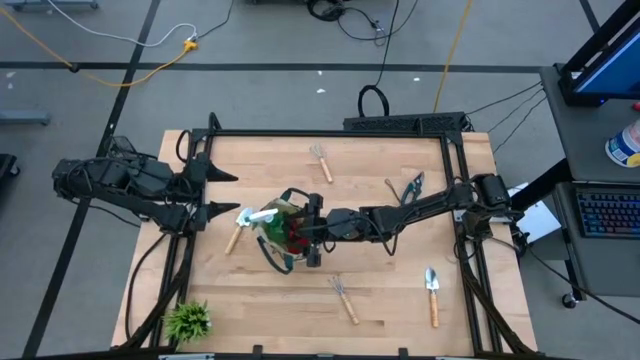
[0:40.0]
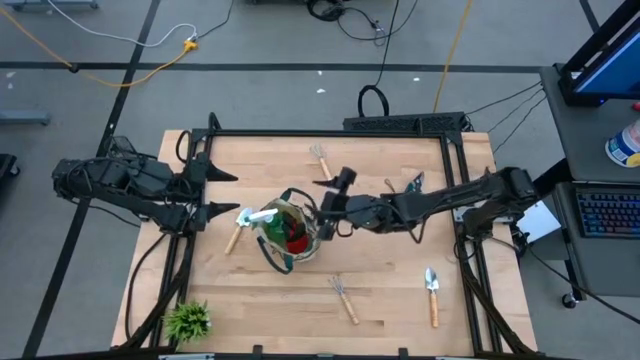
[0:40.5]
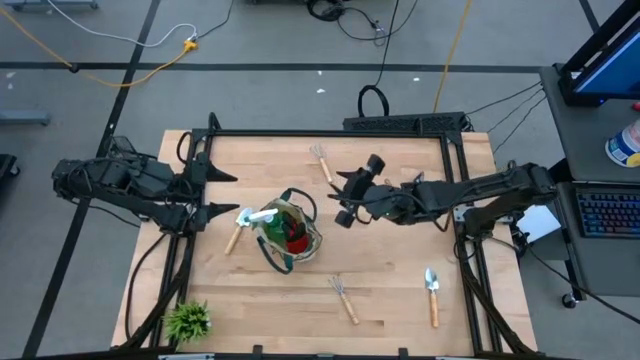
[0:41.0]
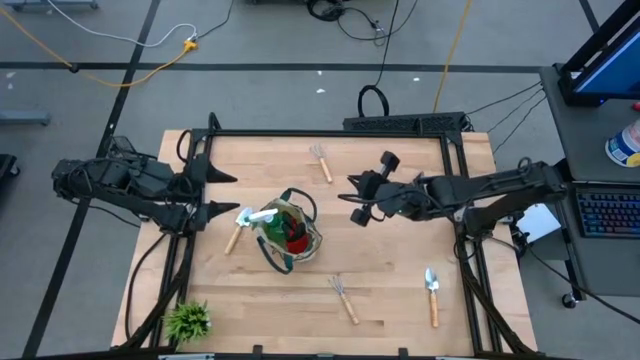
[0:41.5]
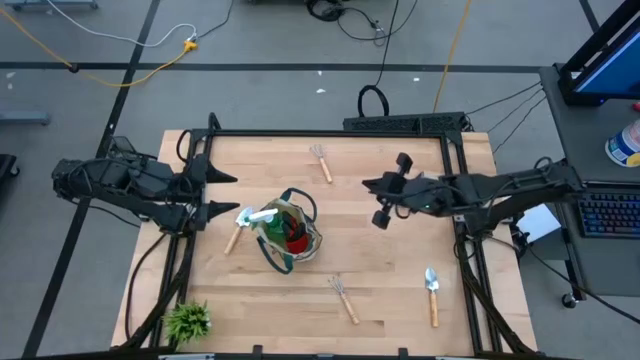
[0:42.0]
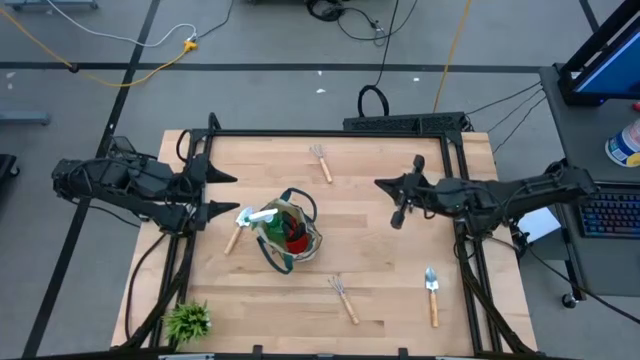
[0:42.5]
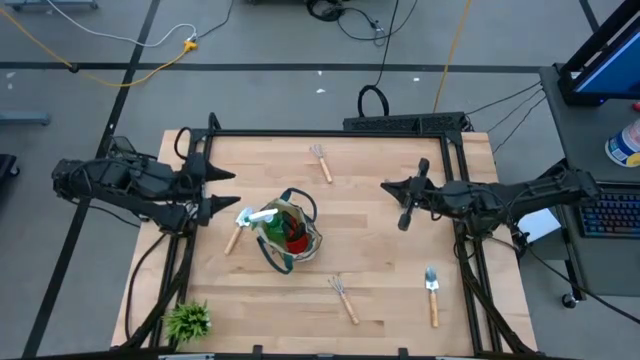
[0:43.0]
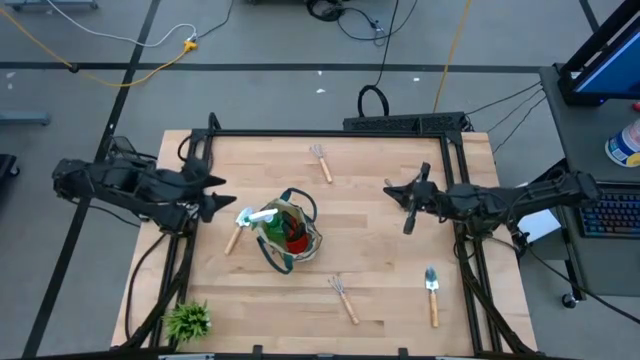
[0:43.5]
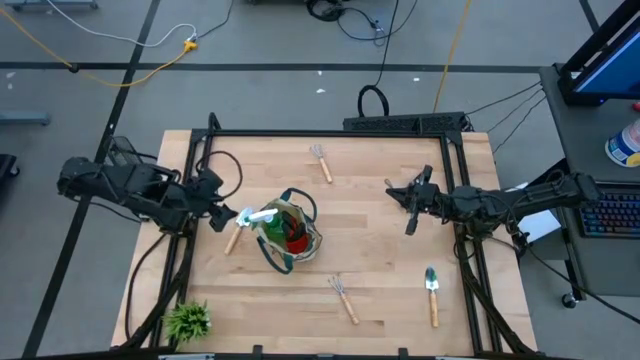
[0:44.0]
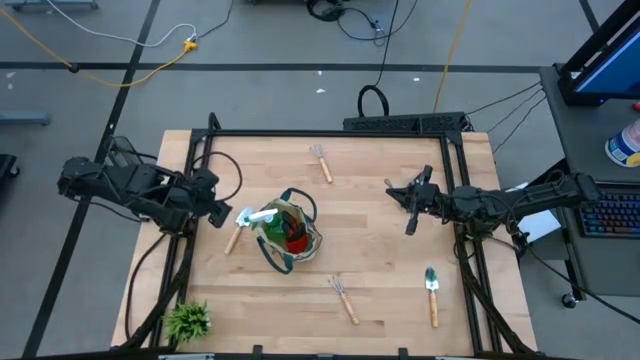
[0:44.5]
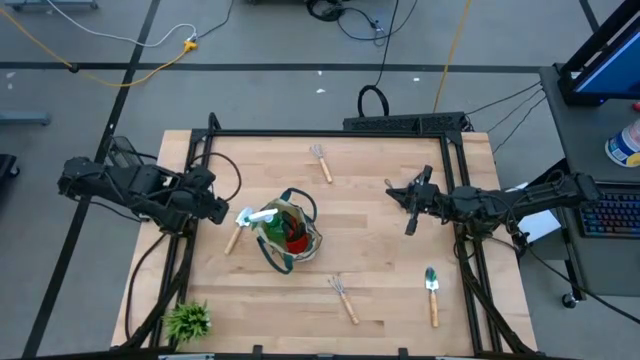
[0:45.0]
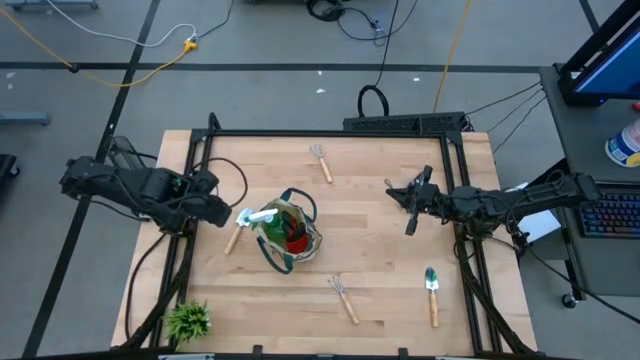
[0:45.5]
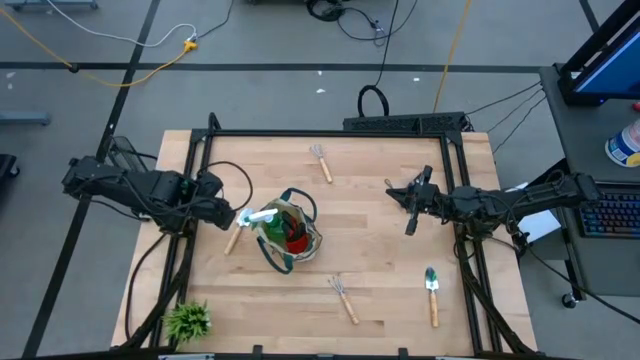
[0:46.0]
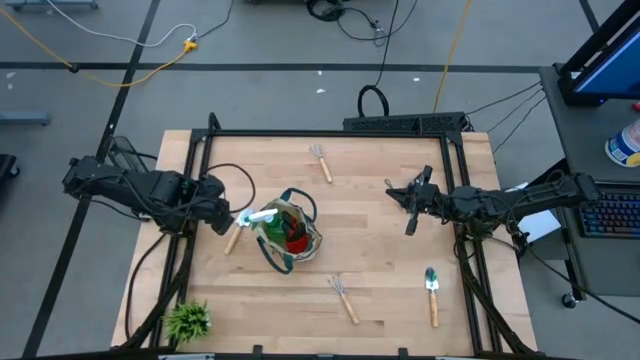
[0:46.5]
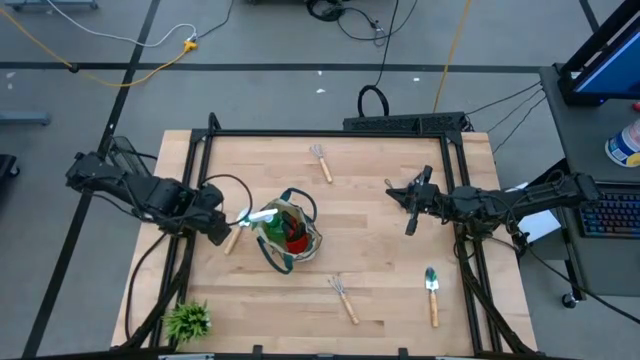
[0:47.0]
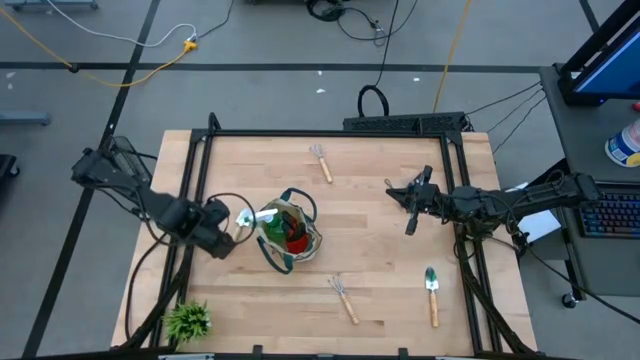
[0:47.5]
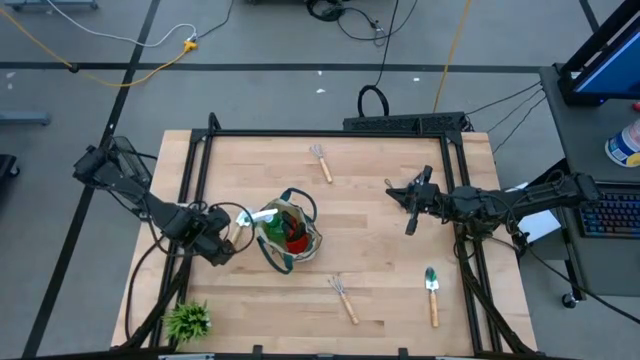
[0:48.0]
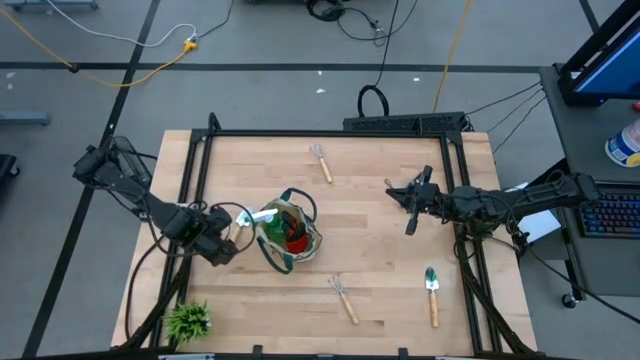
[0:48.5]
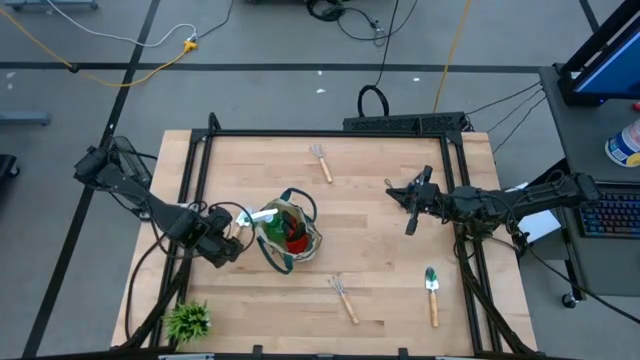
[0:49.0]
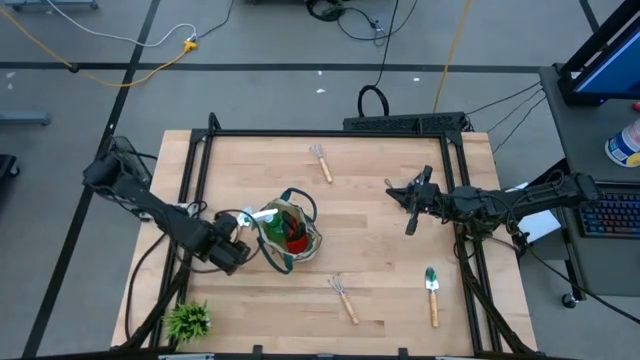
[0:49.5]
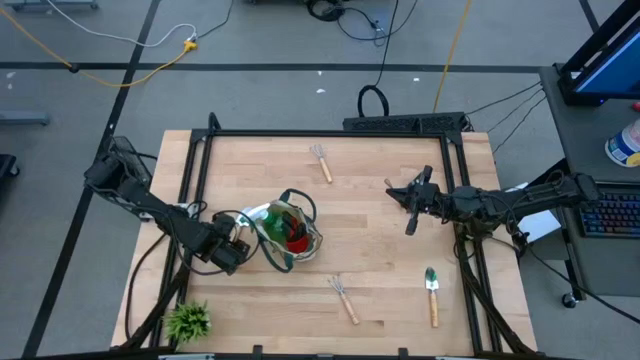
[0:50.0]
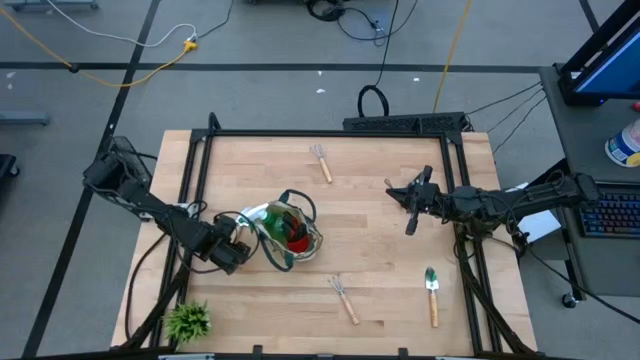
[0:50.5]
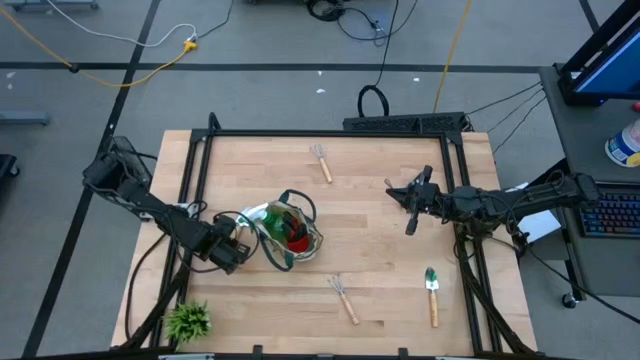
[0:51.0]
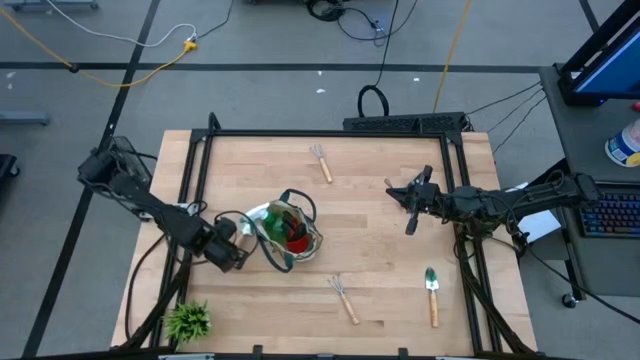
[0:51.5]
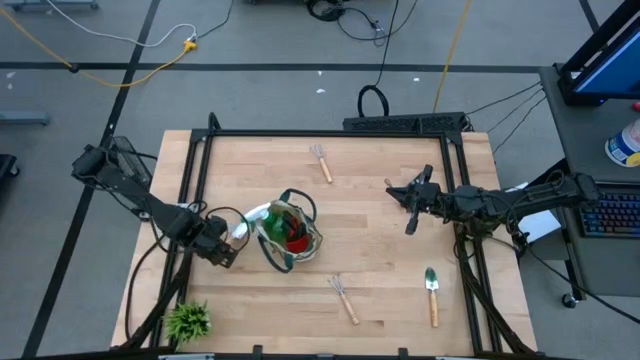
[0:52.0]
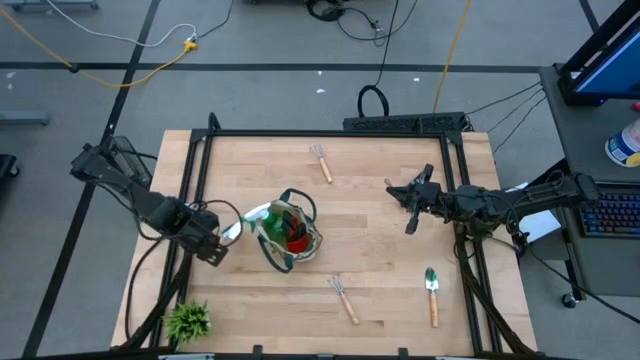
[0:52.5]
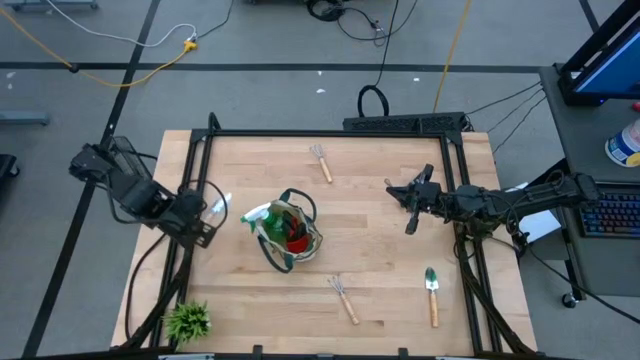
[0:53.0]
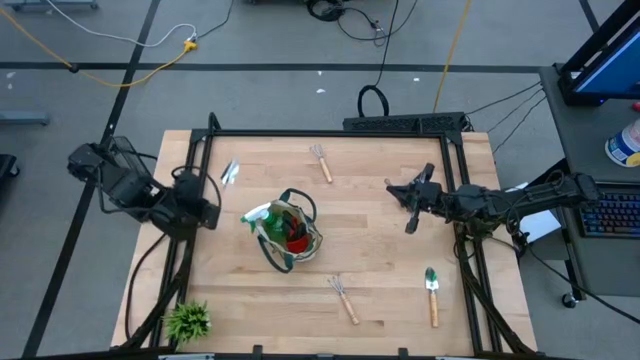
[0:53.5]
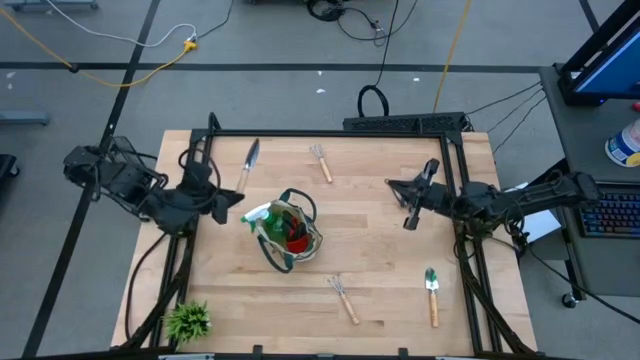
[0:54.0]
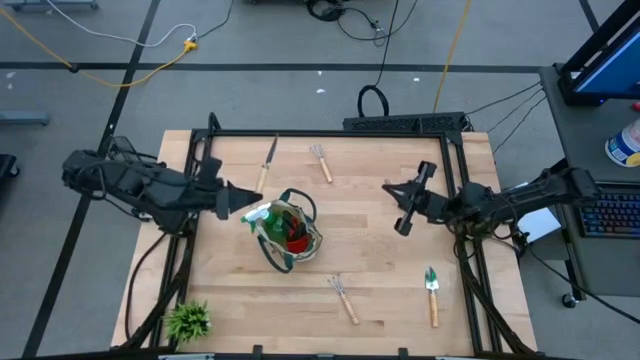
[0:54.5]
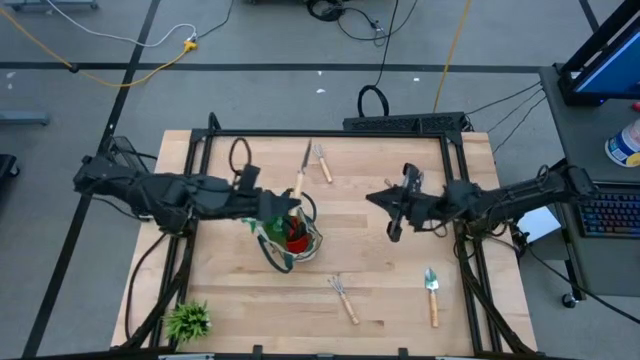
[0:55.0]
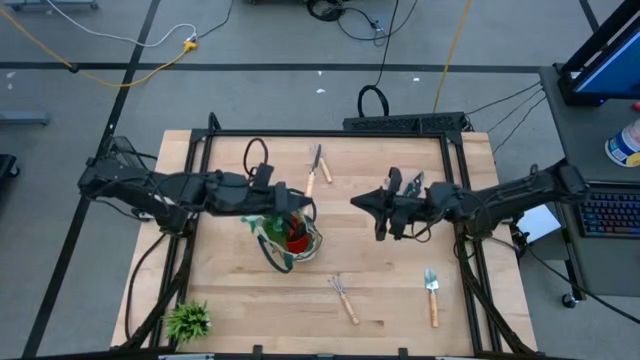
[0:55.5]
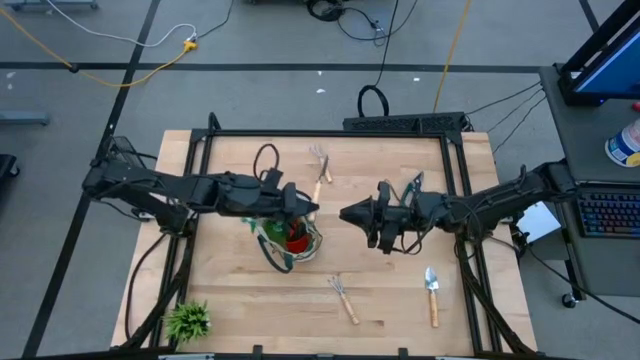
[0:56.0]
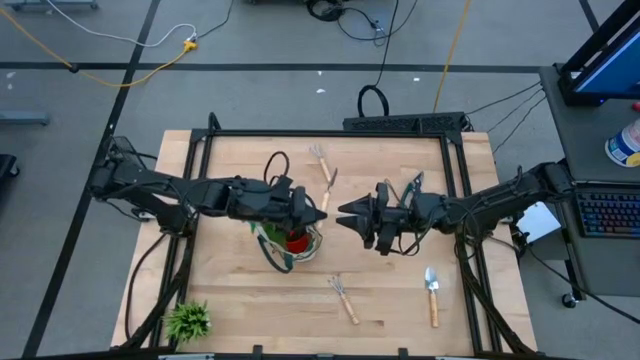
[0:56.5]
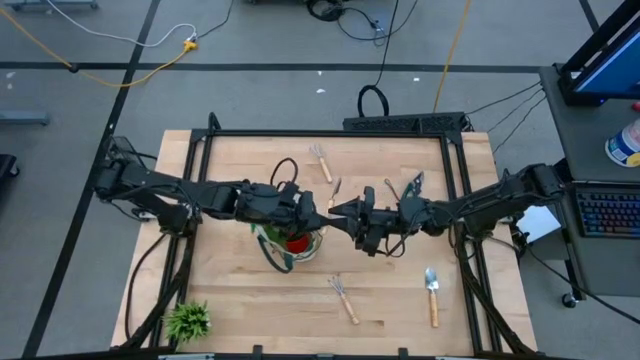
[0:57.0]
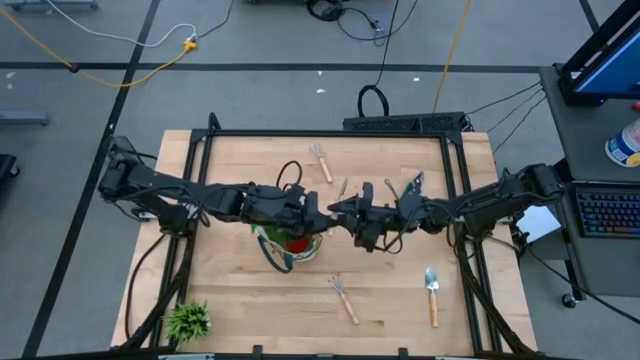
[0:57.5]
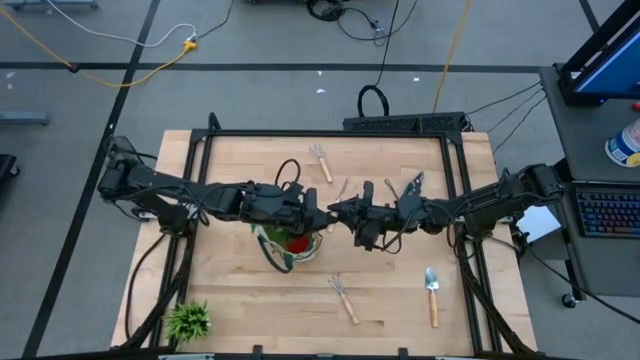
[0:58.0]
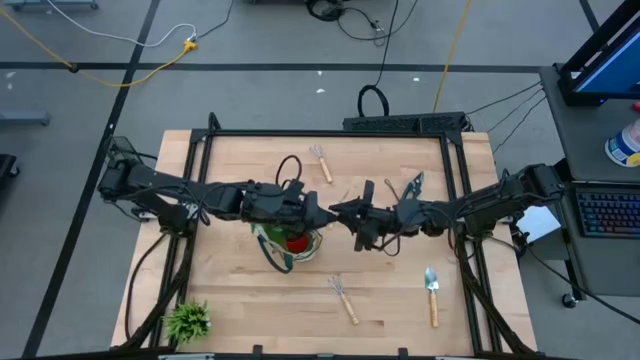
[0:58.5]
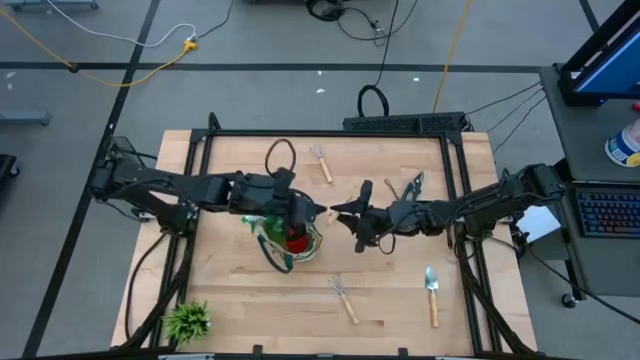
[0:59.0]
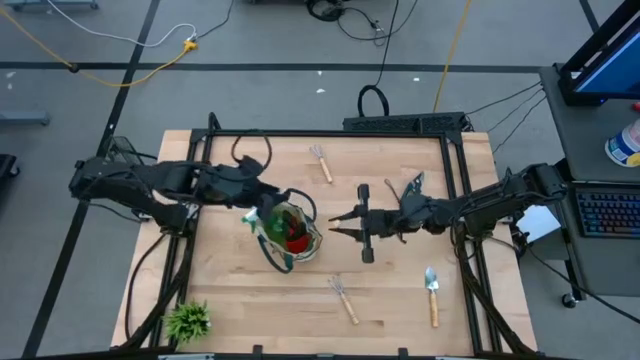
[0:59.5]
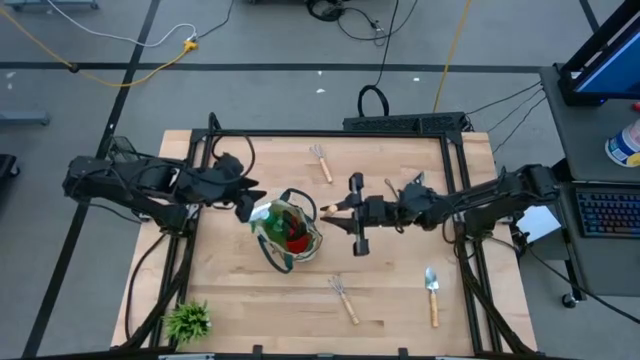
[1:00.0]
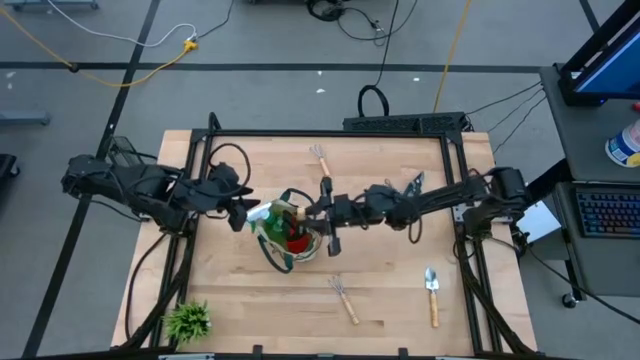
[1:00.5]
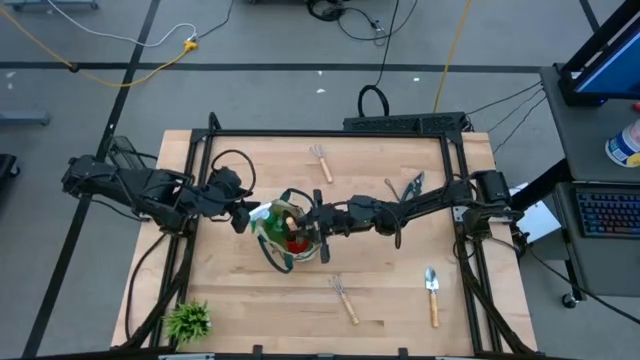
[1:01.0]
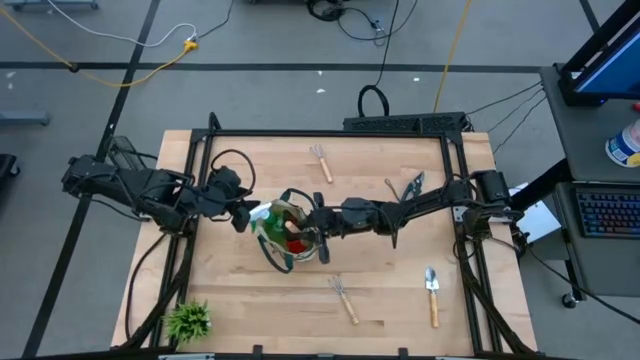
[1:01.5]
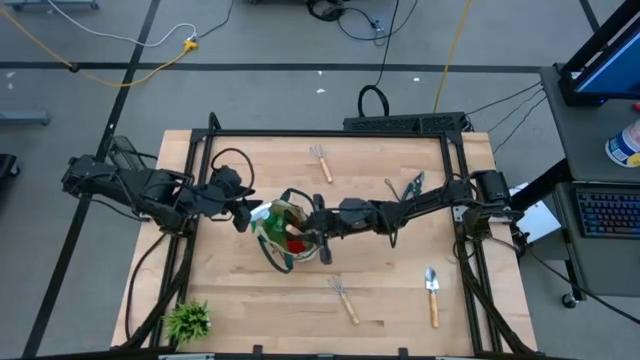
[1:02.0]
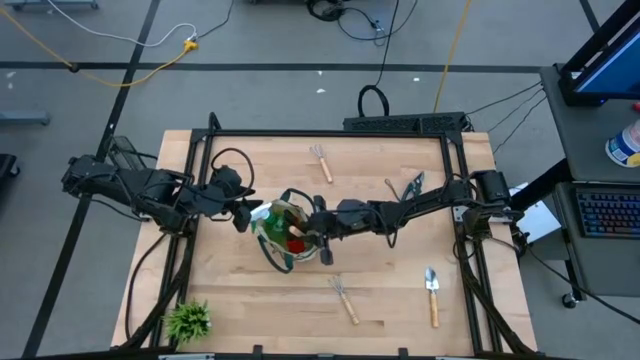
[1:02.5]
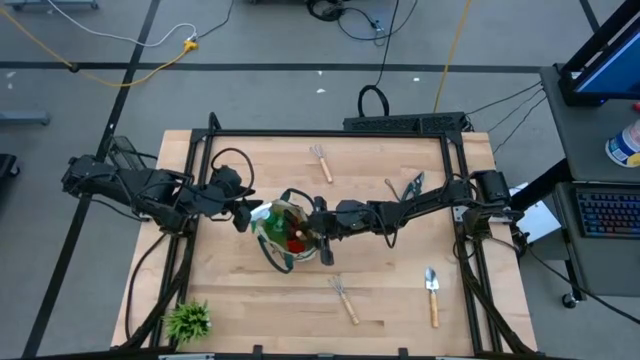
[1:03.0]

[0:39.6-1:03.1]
Task: Pick & Place Garden tools in Gardening bag
Put the left trowel into the gardening bag
